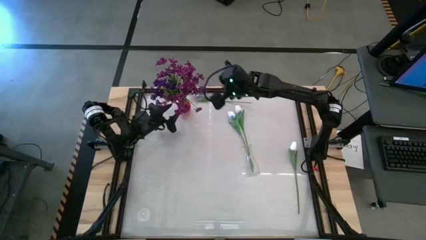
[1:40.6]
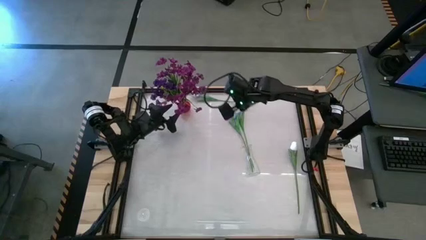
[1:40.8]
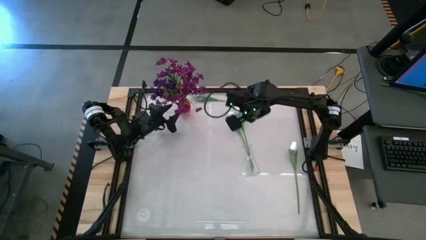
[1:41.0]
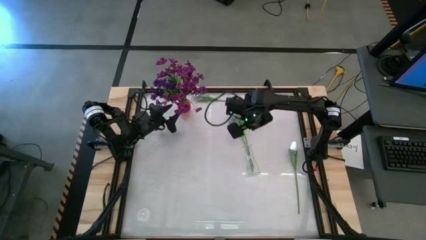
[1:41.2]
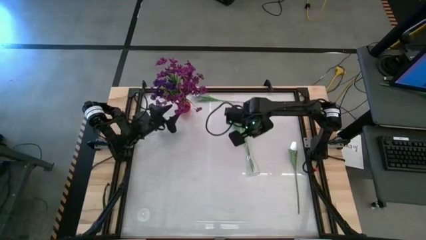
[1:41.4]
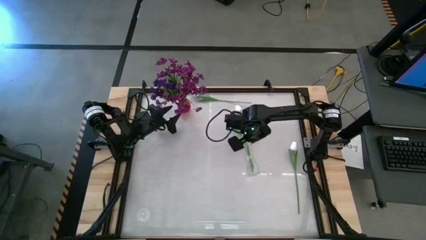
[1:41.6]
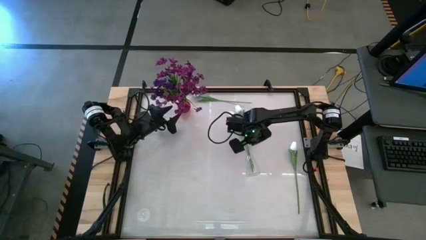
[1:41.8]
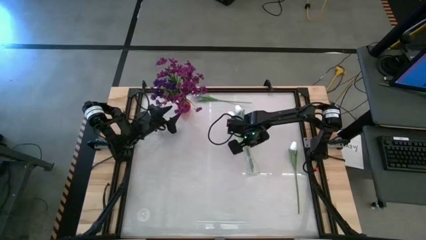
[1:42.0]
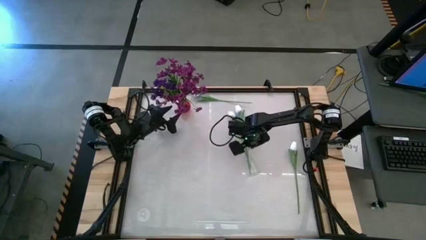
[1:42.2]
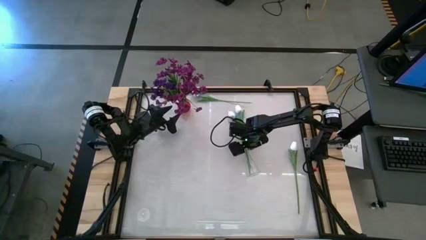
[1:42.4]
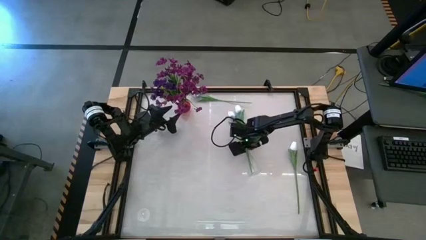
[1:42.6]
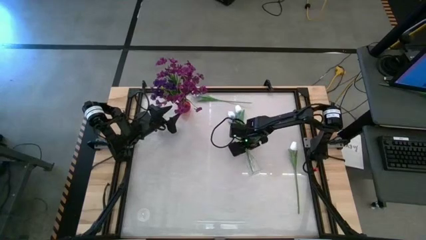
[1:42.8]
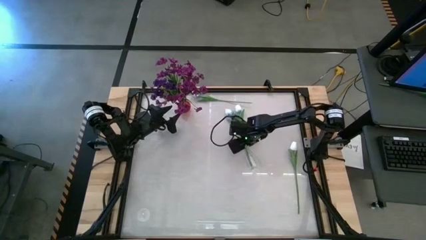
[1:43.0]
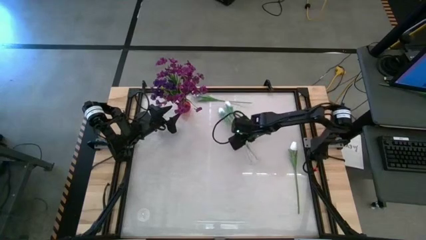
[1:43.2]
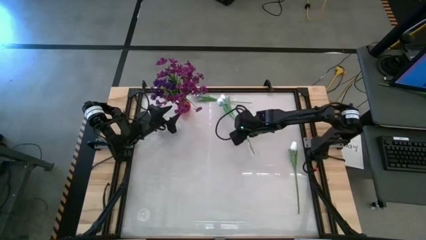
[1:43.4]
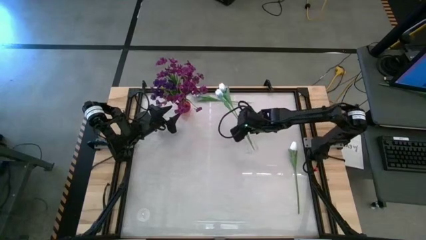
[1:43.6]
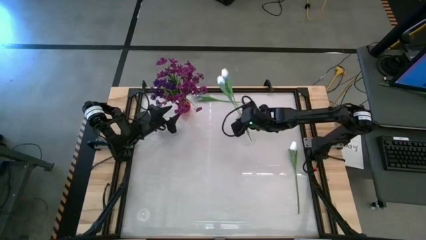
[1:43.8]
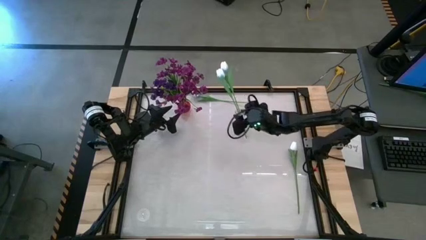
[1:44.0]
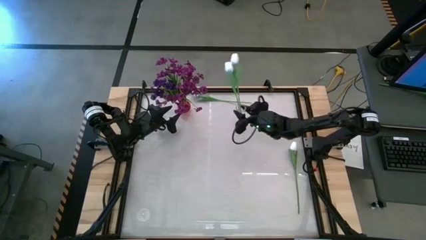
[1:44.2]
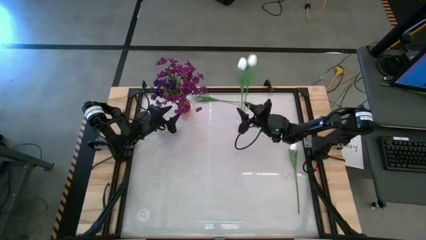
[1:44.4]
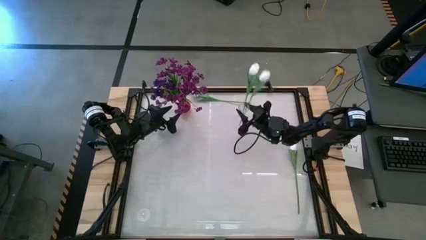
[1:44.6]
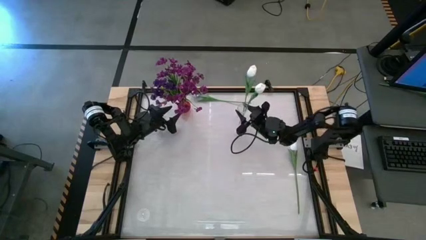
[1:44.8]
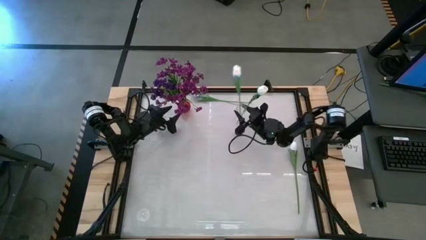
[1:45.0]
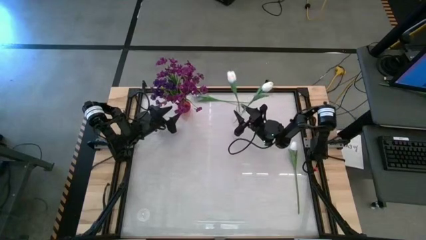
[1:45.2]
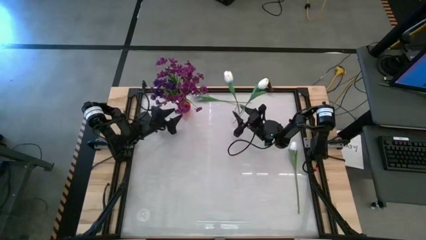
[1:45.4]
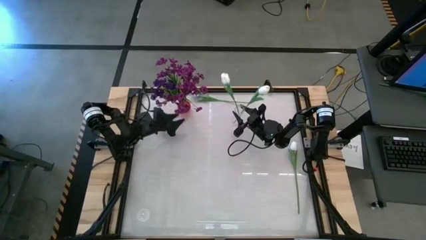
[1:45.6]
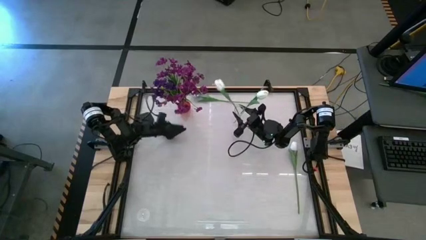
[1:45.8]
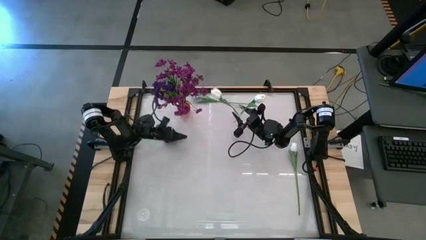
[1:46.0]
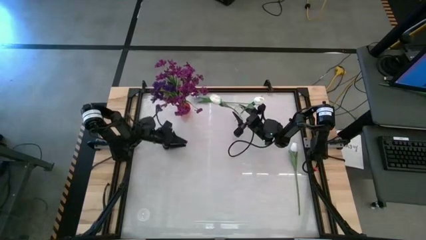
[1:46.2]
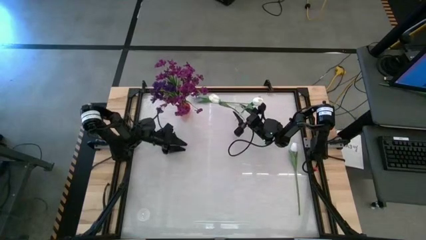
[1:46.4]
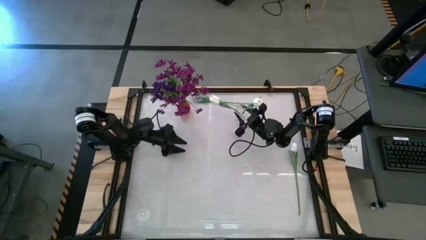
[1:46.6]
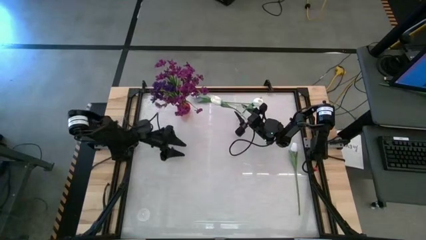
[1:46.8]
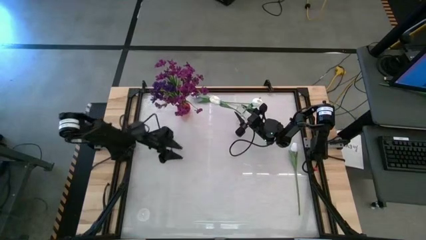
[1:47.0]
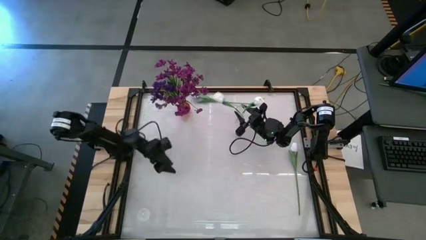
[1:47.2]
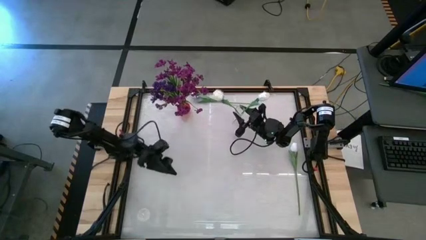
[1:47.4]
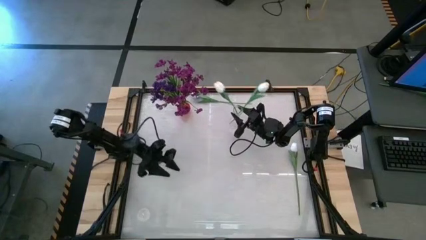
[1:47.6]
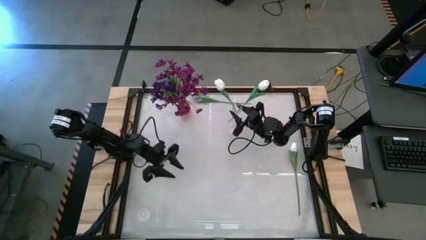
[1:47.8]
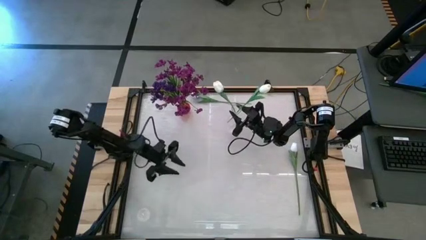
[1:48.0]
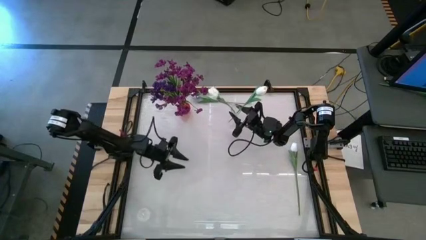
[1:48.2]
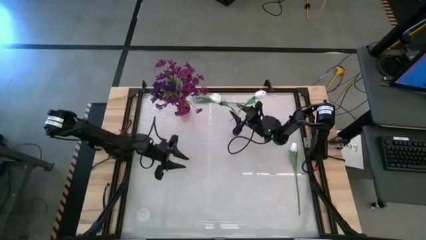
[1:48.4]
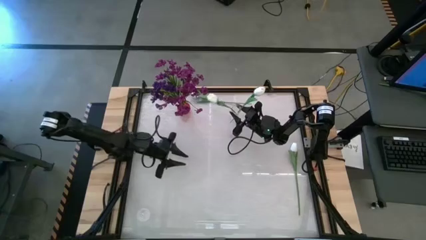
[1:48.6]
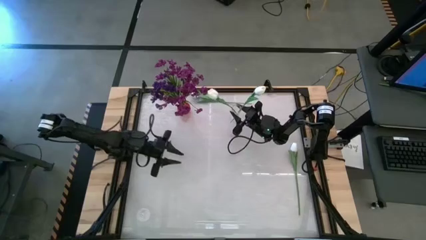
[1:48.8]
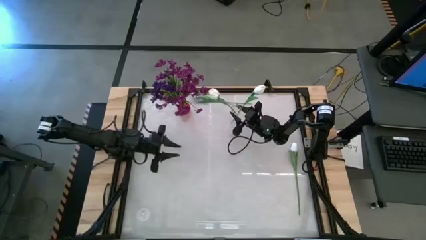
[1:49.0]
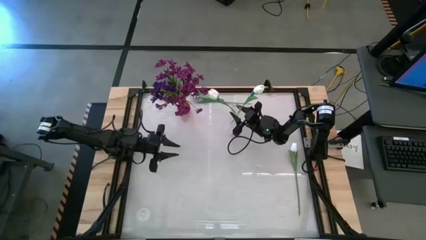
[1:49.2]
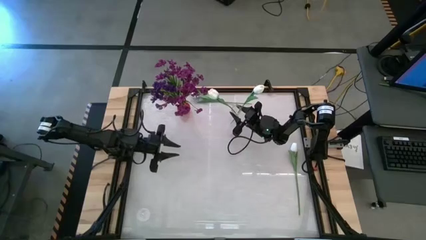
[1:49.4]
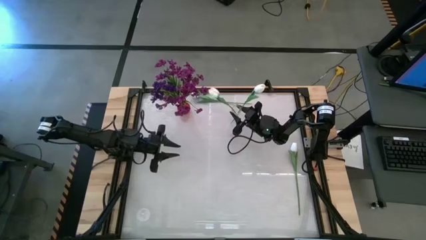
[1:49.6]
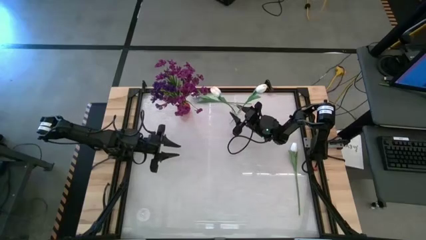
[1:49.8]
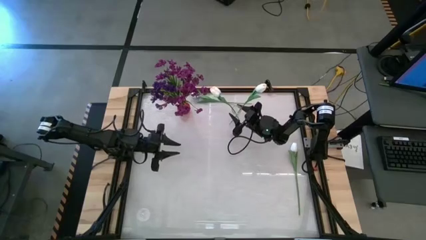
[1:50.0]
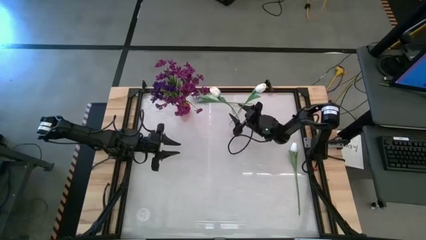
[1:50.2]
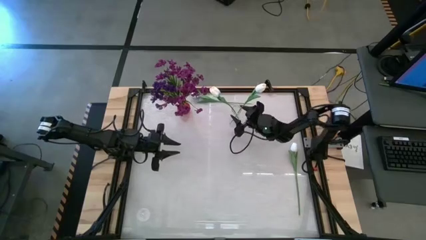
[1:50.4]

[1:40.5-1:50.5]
Task: Sort flowers into vase by color
Adjust the transparent vase

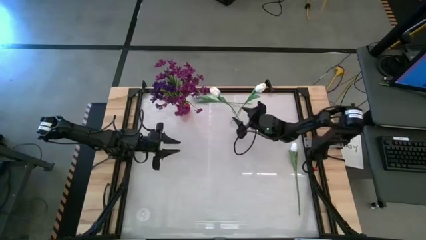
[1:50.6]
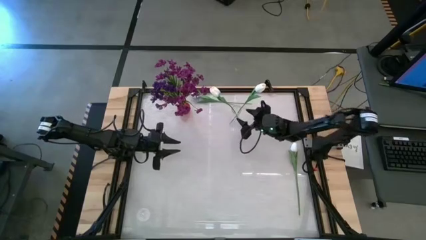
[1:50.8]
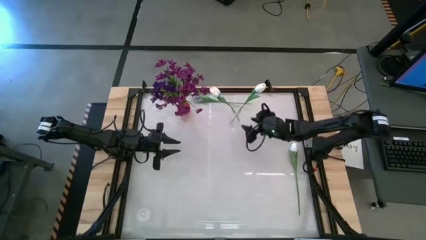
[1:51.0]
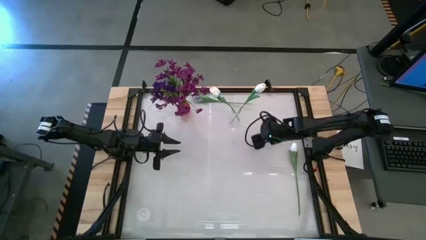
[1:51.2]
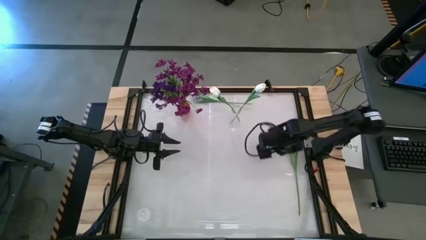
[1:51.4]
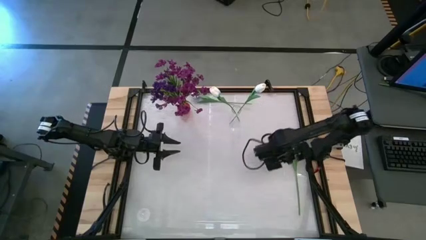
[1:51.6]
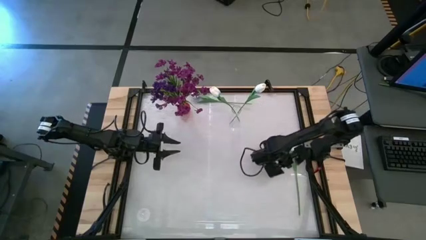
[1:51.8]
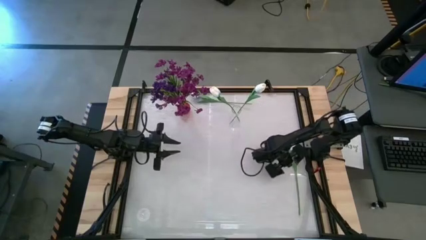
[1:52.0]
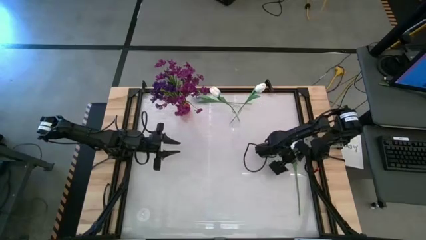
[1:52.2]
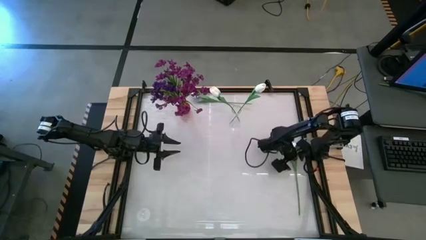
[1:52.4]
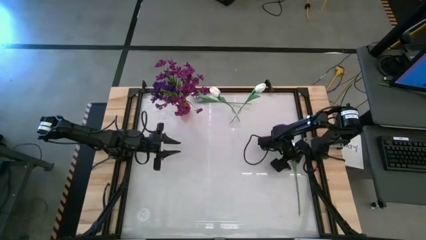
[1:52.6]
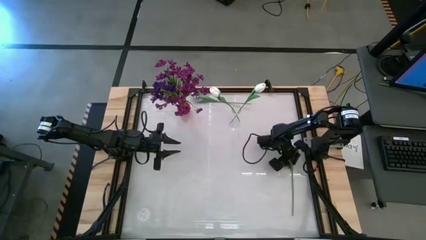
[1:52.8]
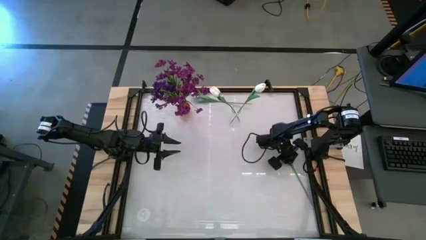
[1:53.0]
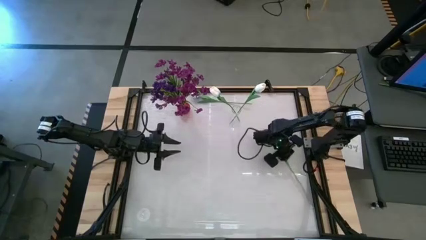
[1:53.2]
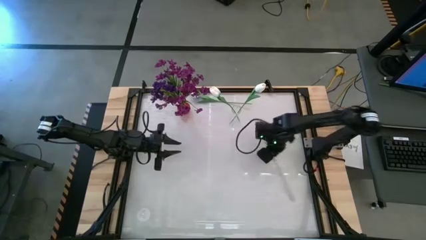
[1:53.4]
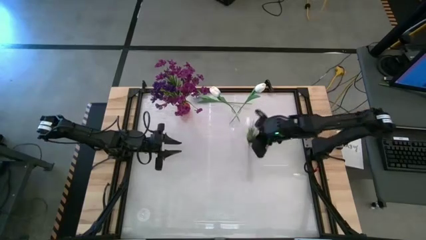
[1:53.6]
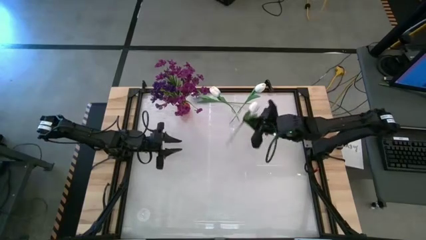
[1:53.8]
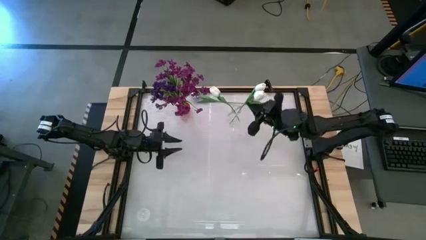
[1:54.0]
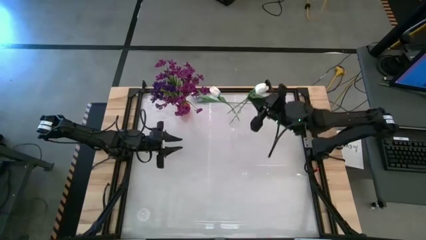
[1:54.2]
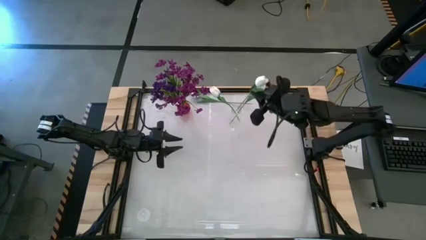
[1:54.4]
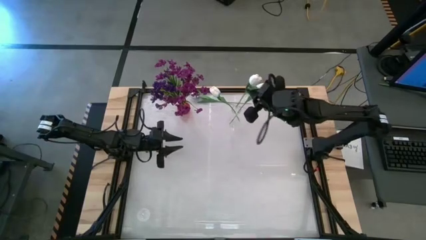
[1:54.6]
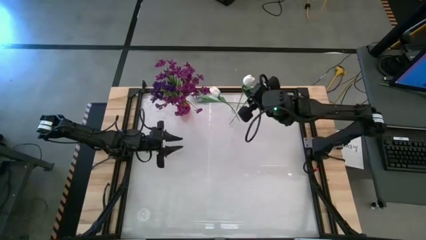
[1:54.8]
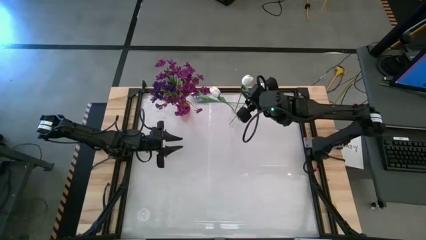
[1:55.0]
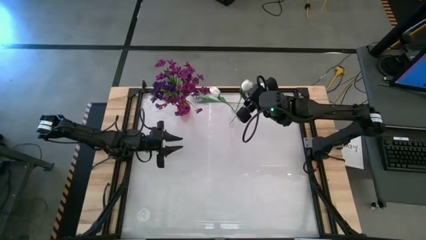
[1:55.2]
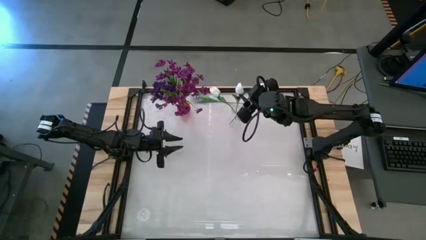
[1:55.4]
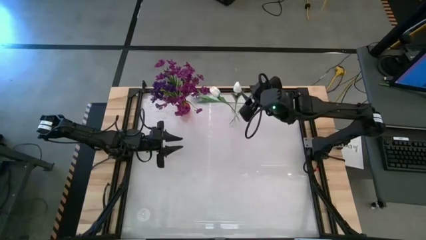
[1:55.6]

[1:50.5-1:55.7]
Put the white flower into the transparent vase

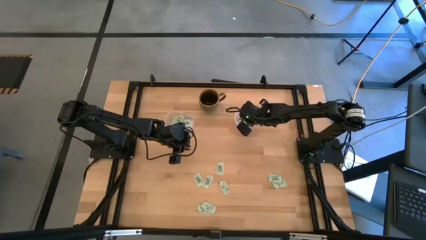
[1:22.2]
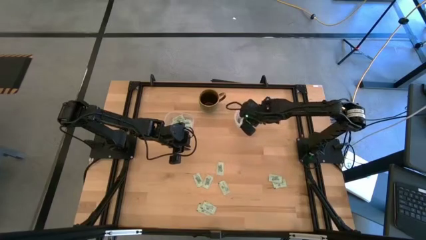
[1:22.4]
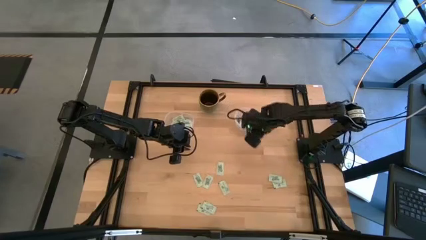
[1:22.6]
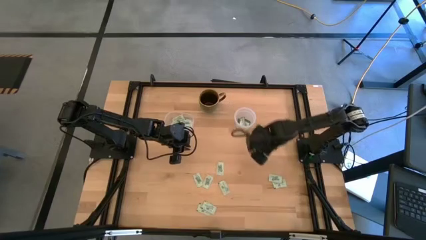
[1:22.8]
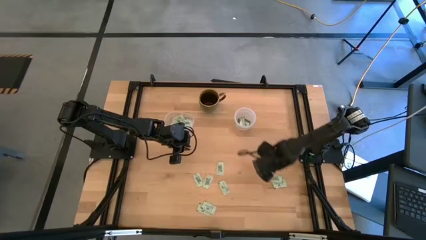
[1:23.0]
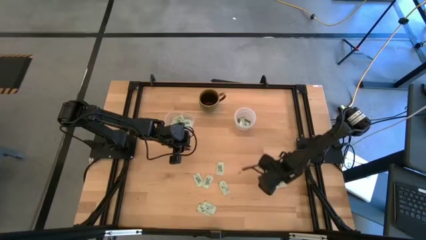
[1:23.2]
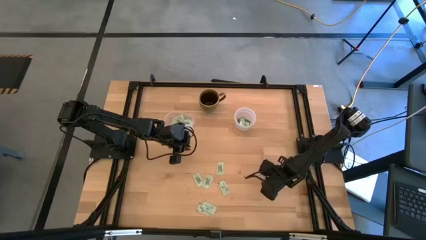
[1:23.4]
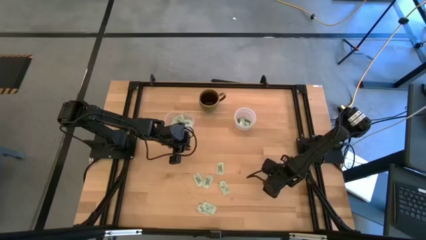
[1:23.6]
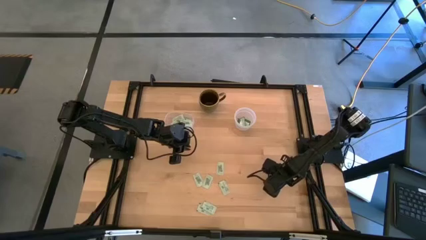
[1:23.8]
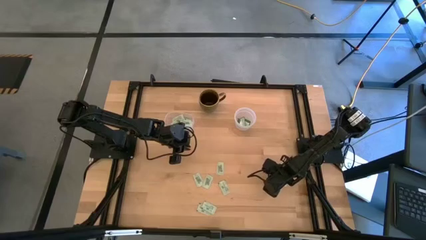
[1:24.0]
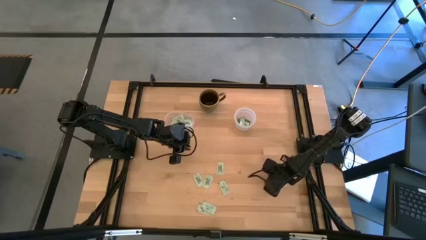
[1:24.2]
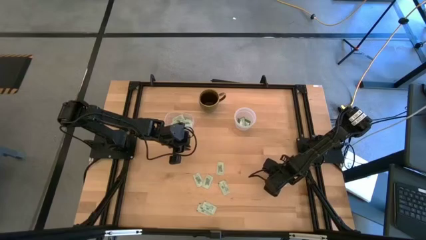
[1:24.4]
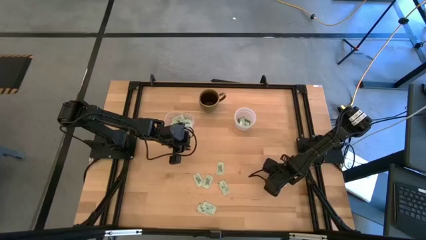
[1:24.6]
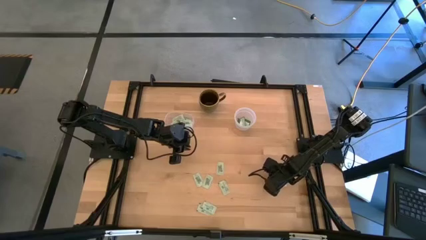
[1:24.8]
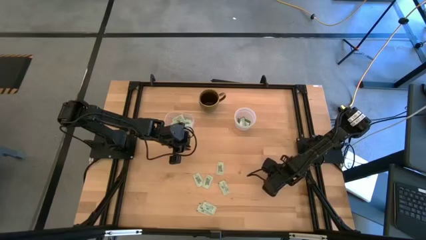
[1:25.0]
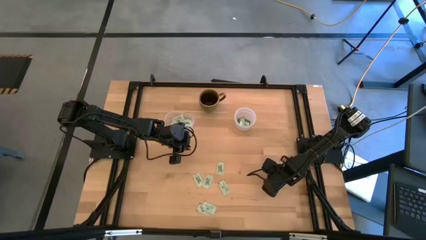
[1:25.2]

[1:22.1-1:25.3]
Task: Pick and place Stevia / Truvia into bins
Put the light green stevia packet into the left transparent container
